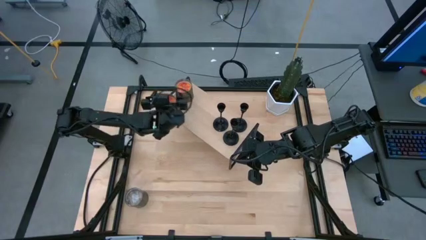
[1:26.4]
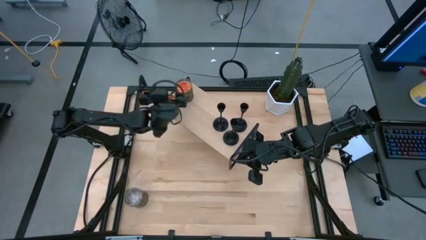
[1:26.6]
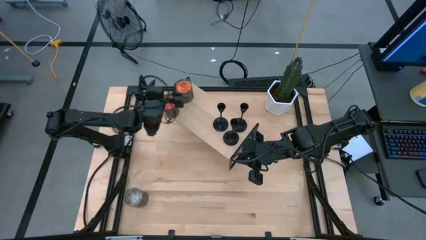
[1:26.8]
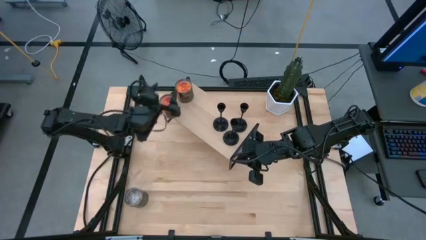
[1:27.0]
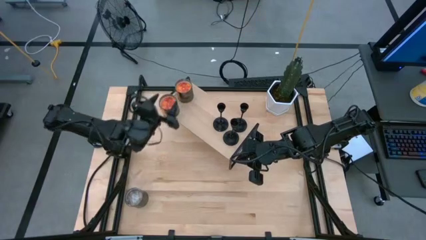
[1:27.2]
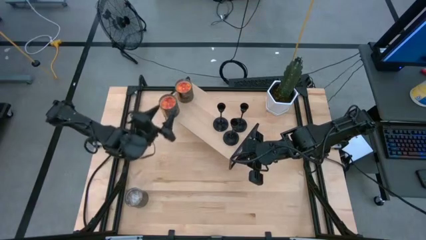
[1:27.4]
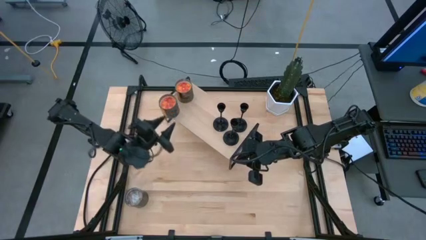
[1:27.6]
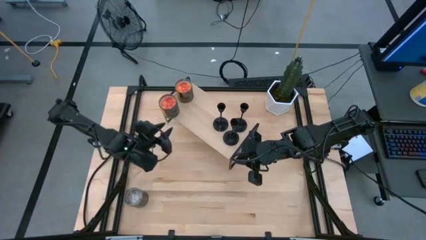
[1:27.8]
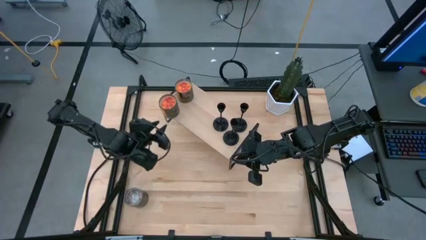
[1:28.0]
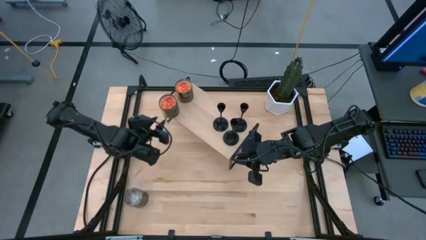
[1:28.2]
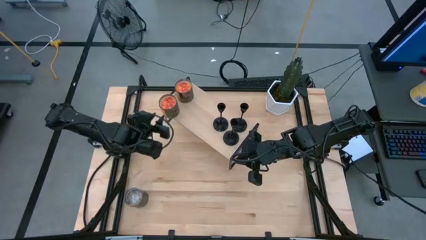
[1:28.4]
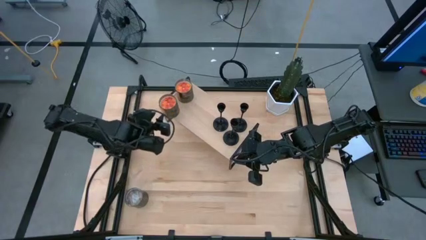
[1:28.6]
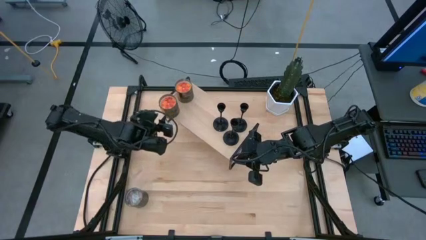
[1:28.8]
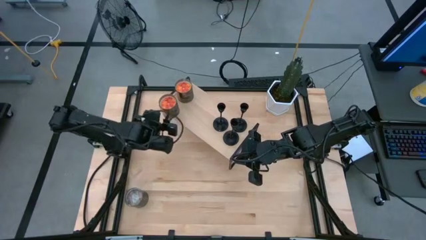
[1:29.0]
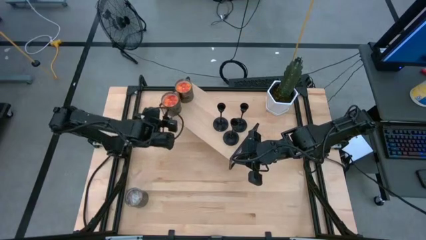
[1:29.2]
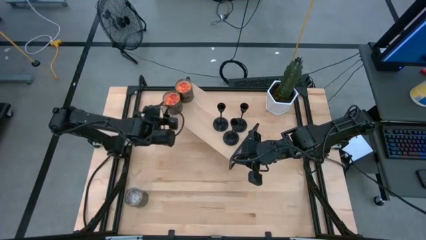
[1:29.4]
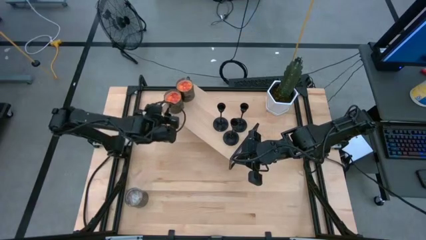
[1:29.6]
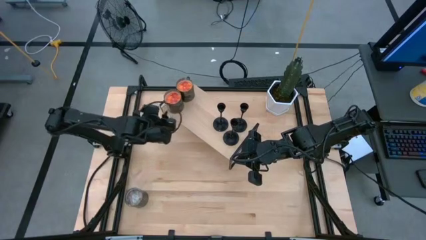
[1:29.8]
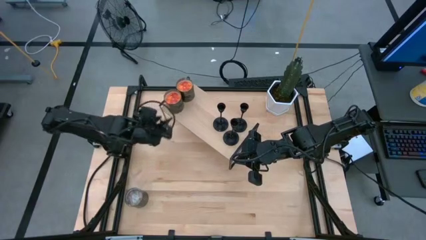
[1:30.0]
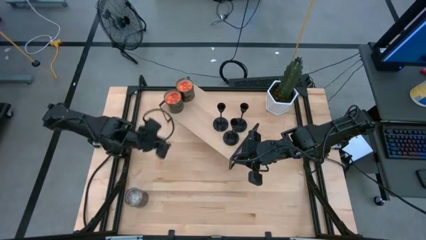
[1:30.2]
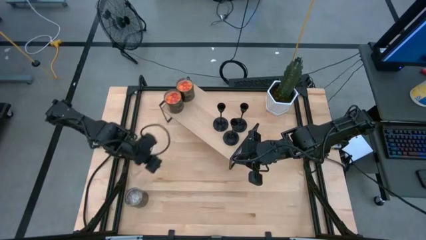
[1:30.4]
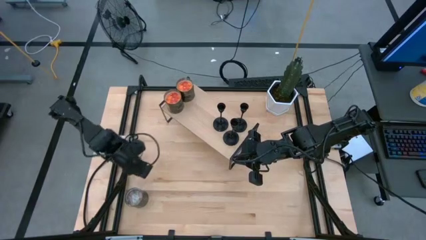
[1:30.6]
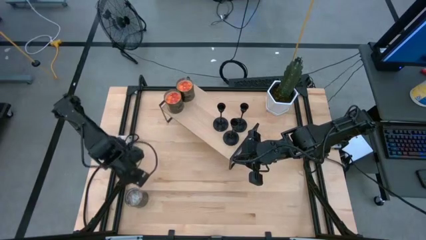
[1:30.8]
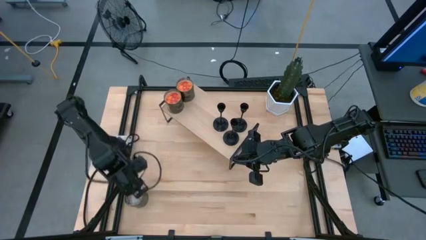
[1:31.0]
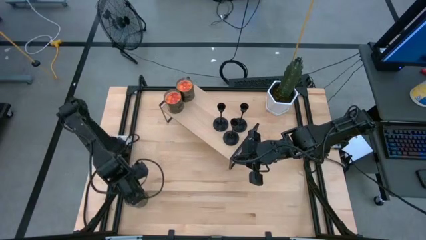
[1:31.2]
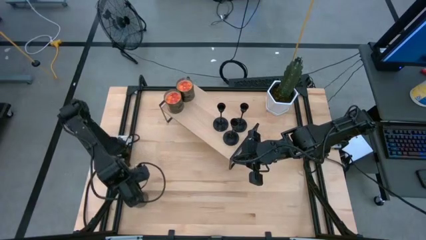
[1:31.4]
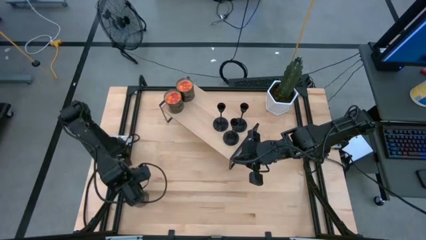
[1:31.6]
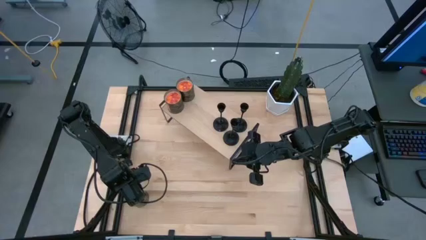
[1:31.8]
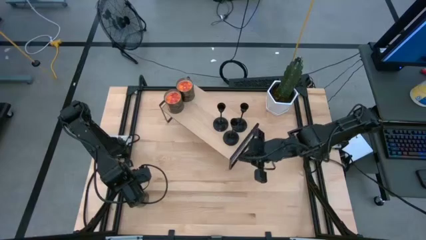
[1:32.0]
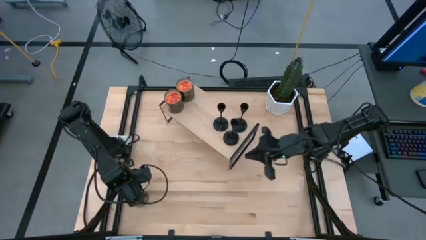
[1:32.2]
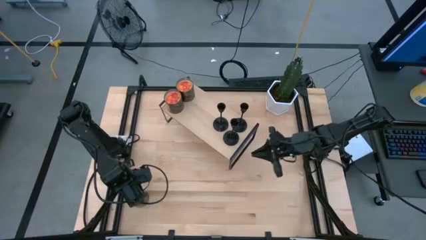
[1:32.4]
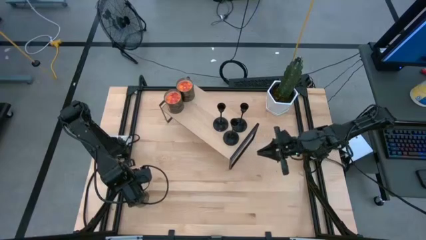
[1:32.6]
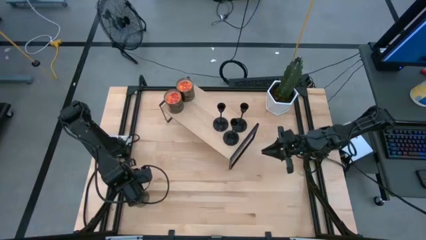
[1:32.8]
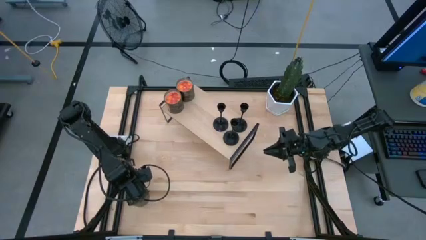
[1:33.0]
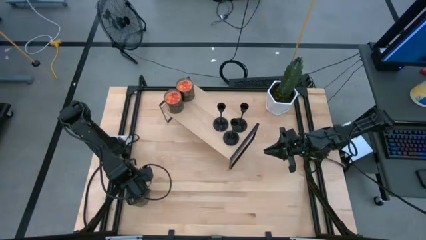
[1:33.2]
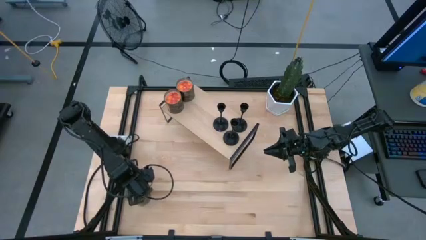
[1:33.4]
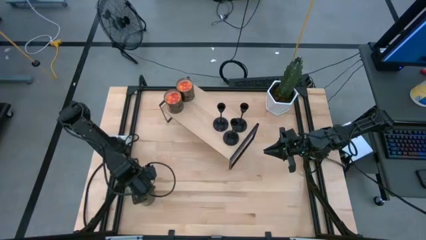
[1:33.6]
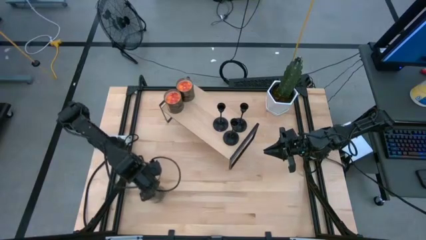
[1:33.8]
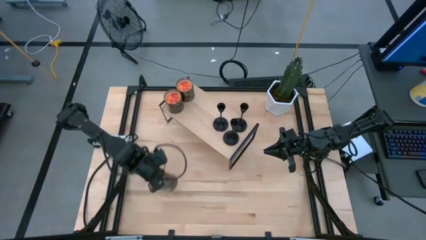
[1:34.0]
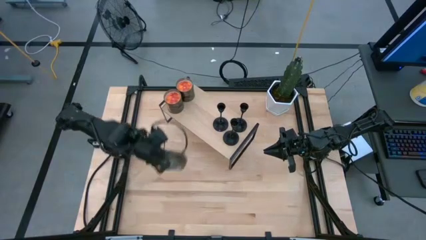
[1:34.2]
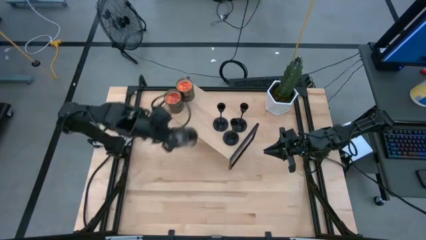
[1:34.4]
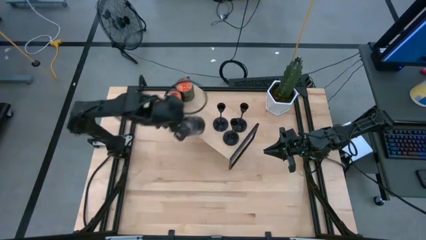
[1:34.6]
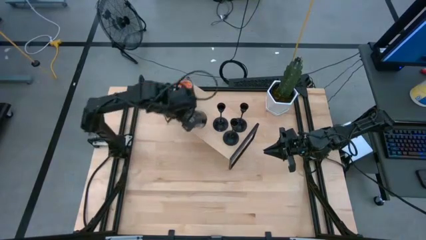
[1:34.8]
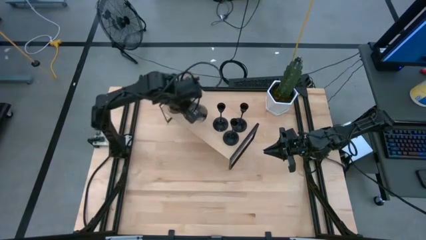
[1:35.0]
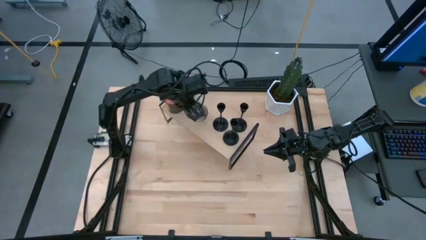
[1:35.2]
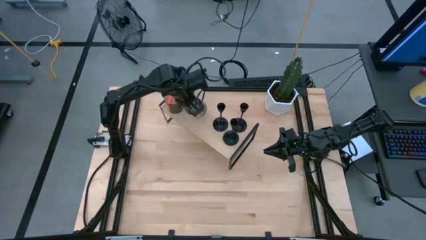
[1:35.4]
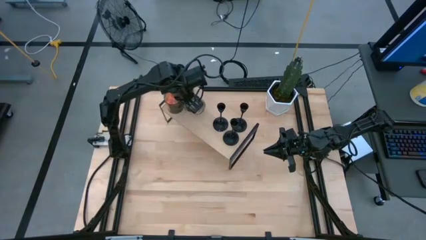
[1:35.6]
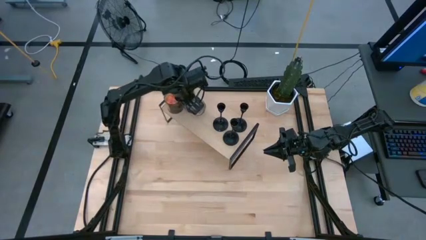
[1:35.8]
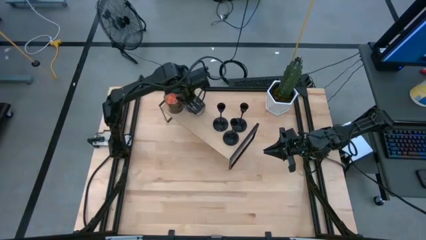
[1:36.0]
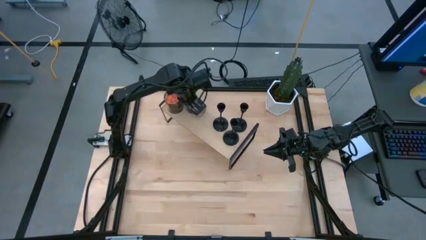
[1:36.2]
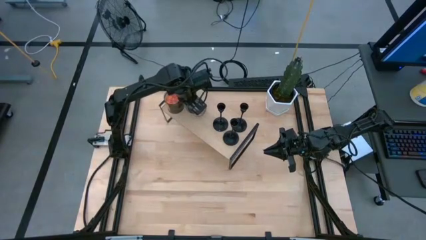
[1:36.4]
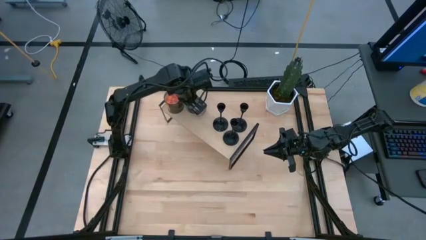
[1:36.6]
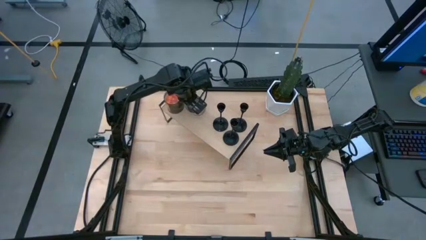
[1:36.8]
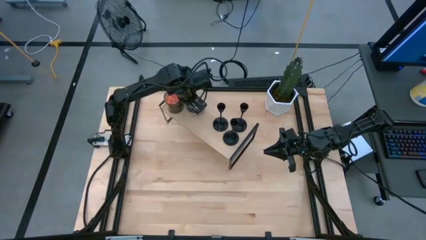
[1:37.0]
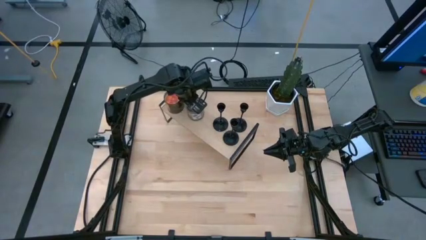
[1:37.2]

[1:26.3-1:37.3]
Task: Pick & Place candle stick holders
Put the brown scented candle on the shelf

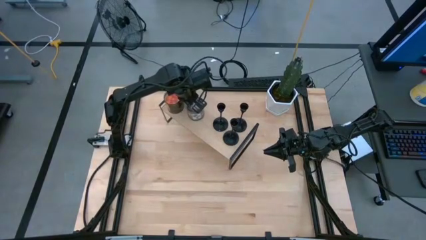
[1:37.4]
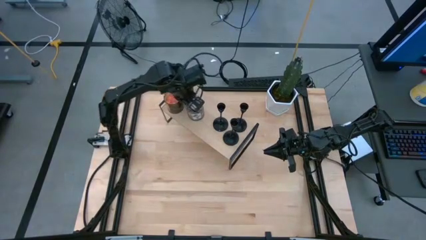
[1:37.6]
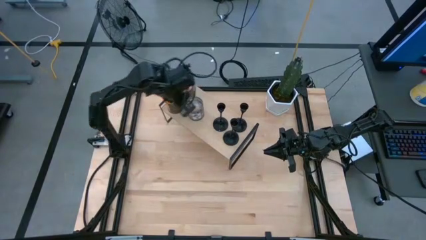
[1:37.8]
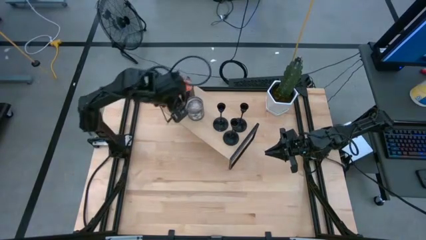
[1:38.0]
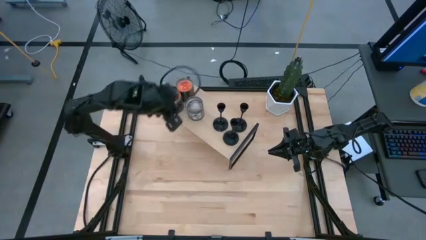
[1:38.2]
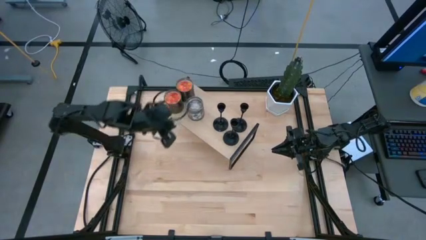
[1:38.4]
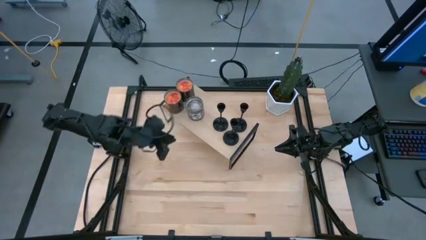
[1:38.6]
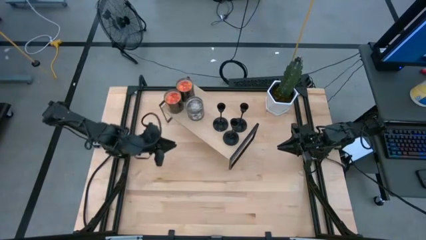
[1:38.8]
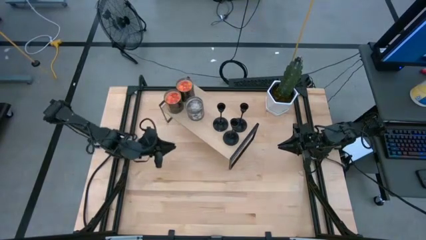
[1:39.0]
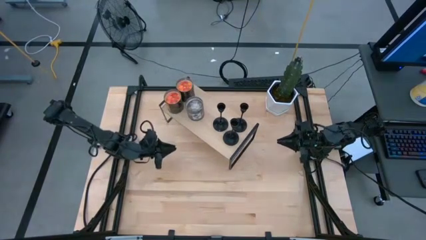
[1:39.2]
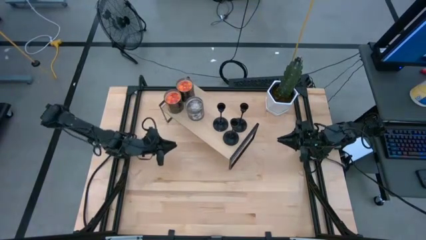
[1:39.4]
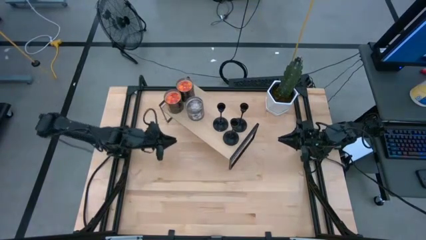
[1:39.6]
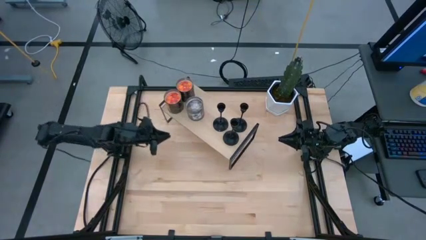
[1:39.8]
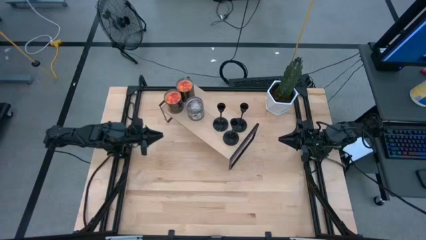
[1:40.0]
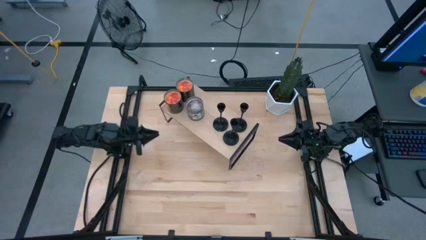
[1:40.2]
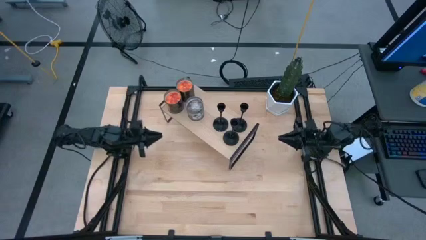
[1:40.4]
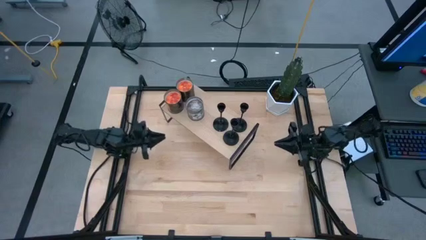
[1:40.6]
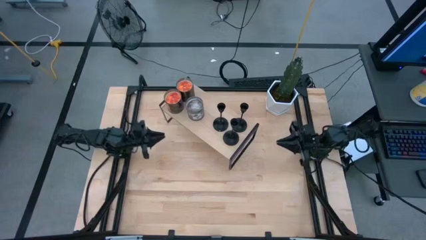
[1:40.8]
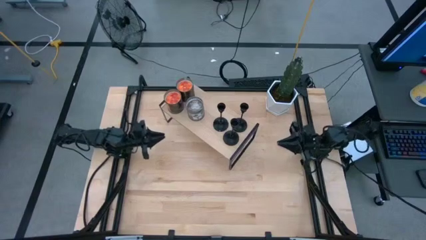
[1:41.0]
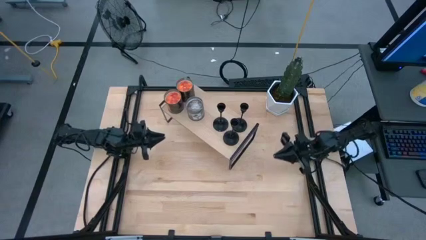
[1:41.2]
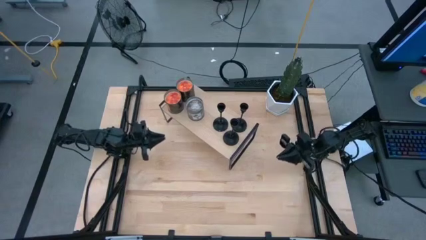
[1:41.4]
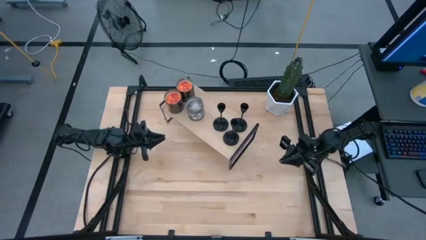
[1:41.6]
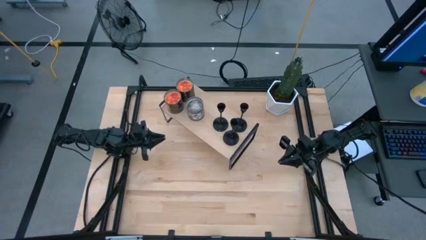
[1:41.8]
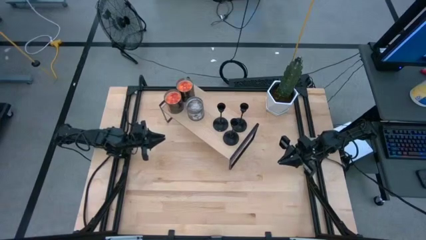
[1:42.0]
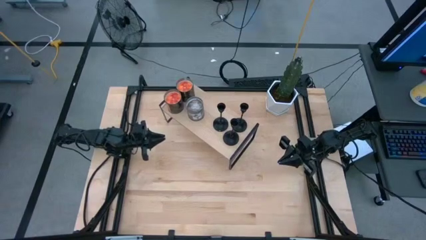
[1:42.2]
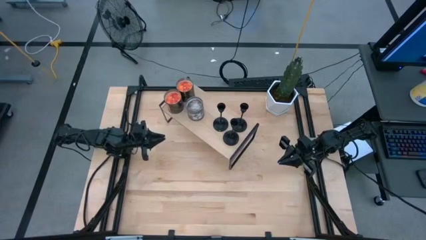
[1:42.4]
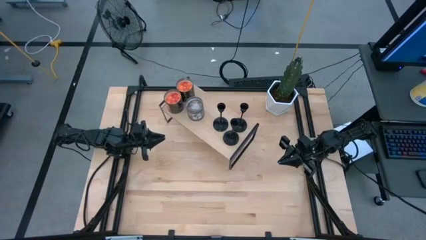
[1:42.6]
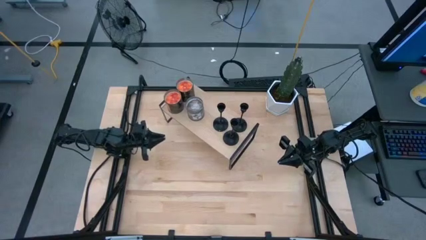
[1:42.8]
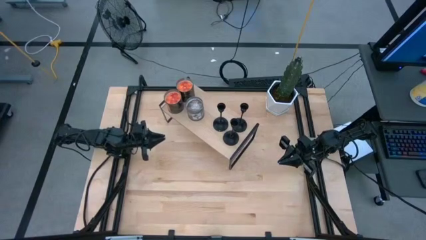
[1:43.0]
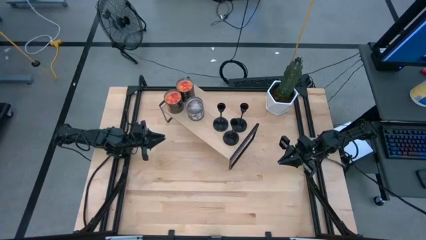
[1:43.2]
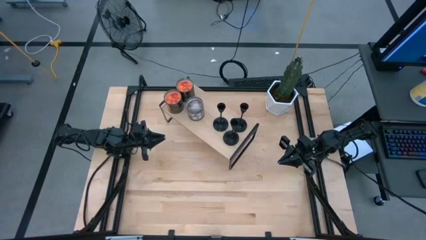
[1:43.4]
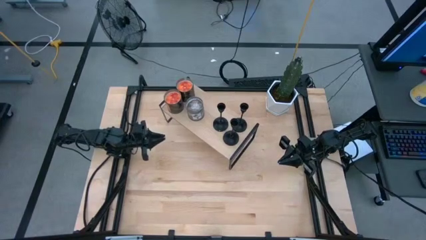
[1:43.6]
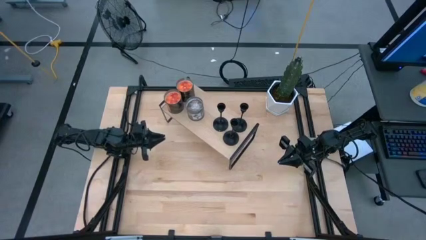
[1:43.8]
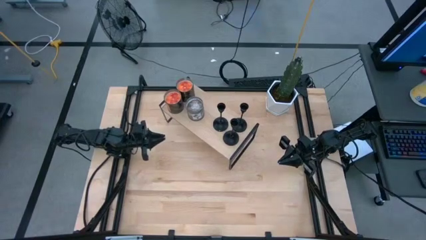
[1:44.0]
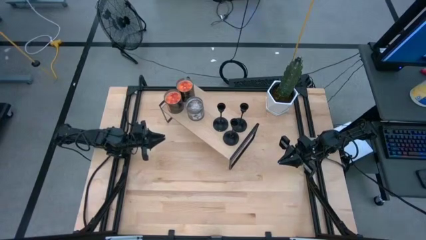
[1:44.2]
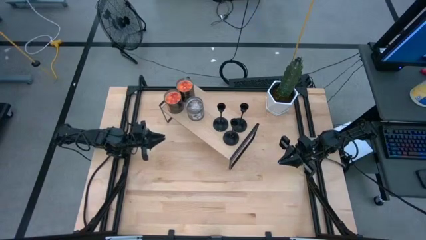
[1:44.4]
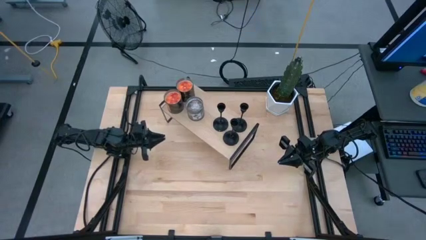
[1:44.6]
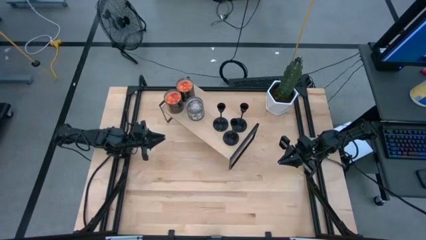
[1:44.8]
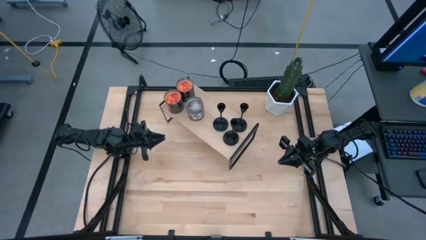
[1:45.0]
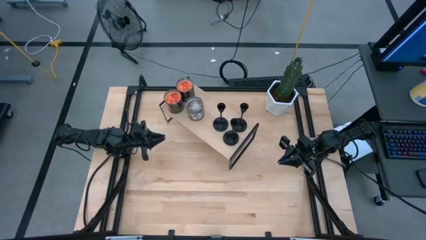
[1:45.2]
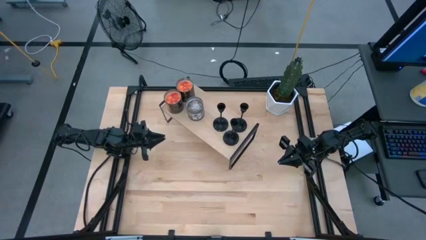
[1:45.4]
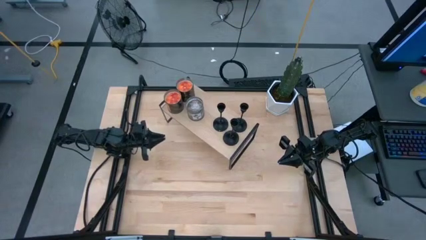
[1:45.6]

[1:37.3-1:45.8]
Return to Home Position
